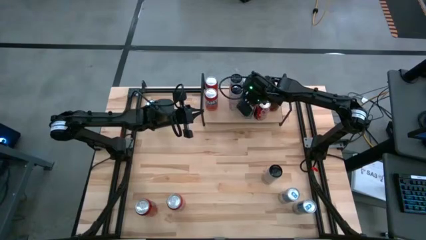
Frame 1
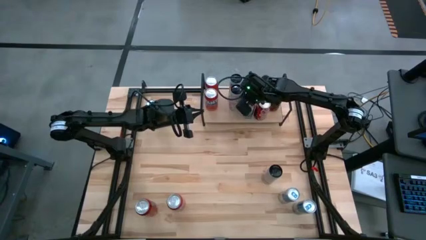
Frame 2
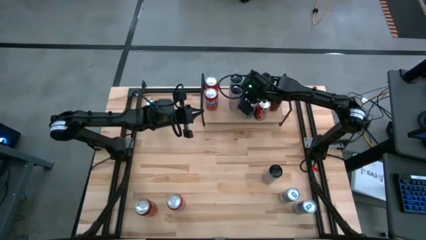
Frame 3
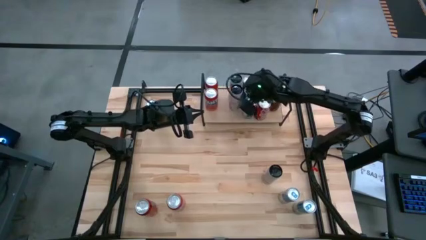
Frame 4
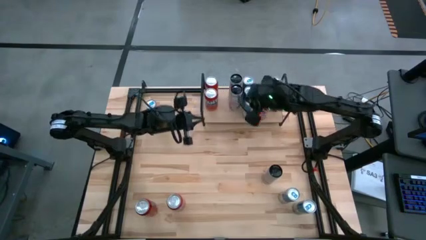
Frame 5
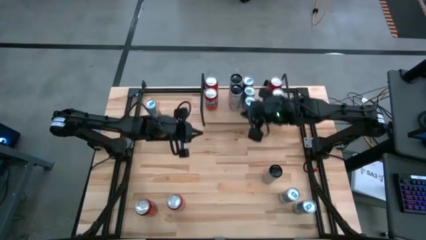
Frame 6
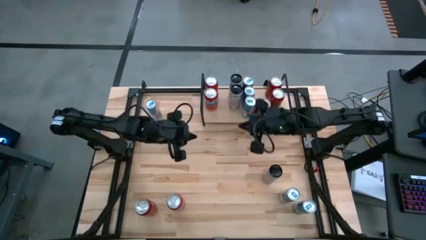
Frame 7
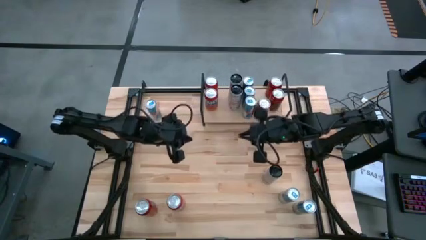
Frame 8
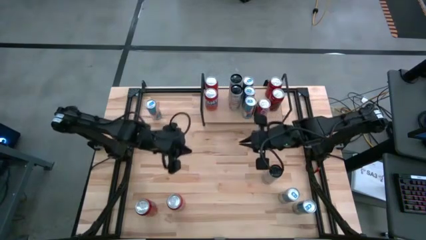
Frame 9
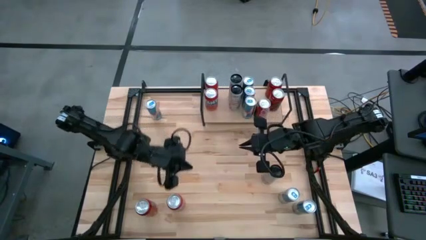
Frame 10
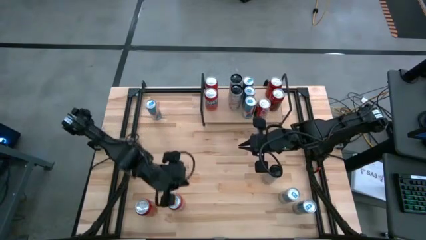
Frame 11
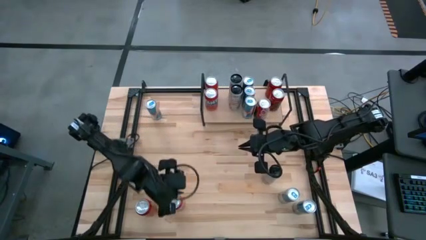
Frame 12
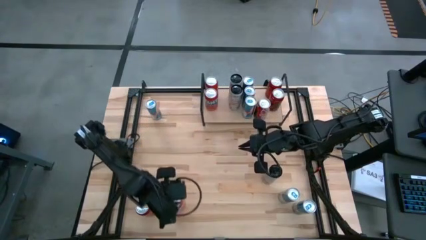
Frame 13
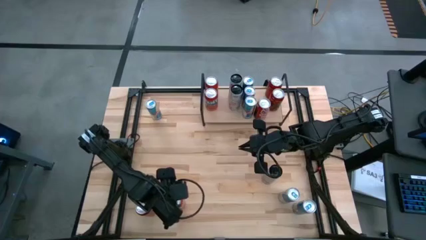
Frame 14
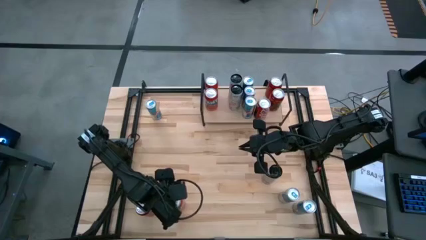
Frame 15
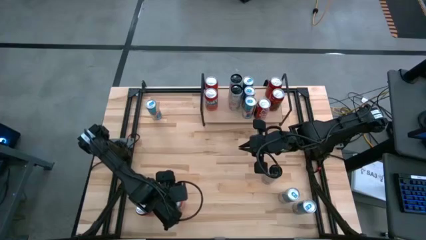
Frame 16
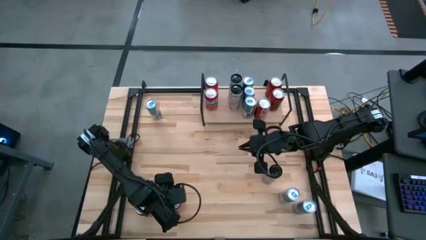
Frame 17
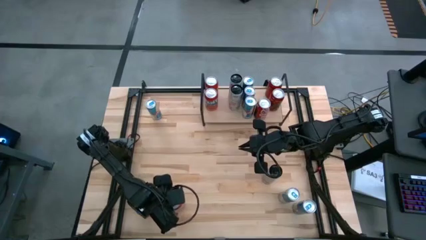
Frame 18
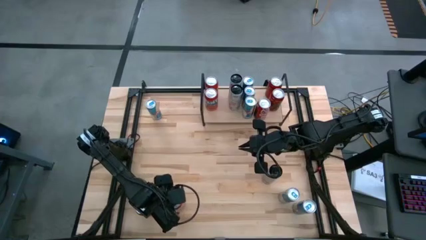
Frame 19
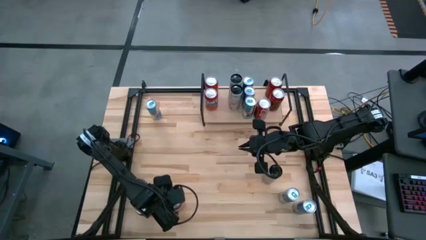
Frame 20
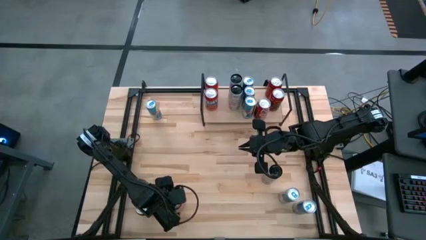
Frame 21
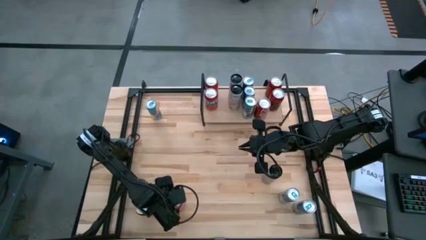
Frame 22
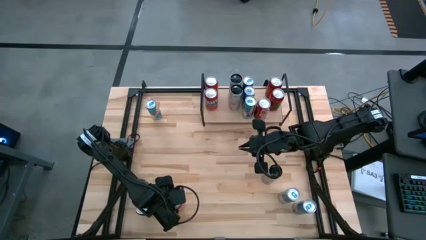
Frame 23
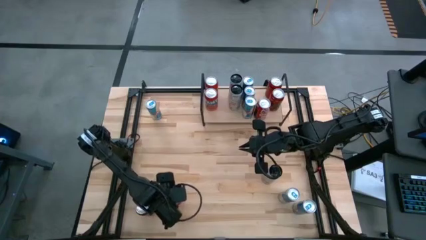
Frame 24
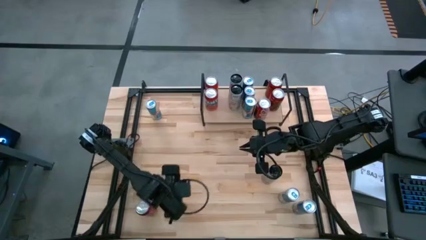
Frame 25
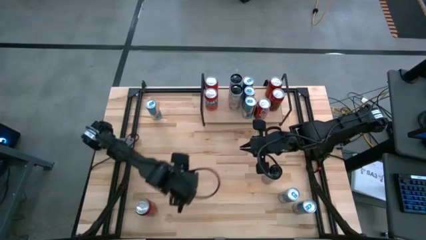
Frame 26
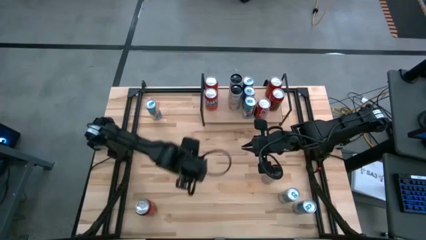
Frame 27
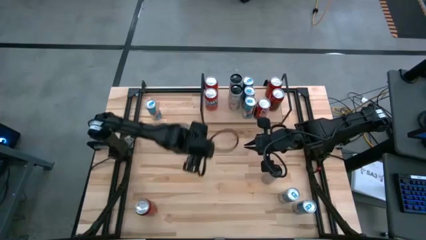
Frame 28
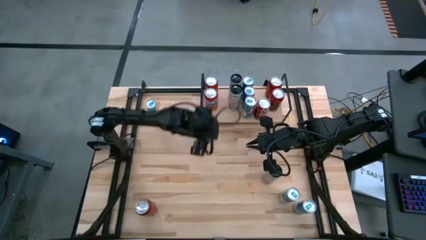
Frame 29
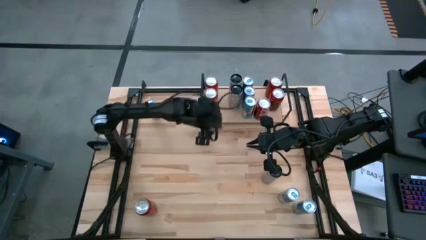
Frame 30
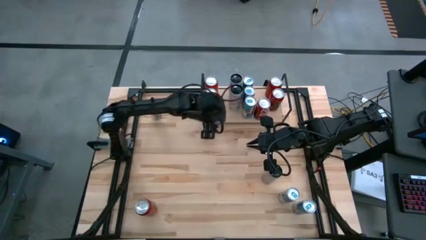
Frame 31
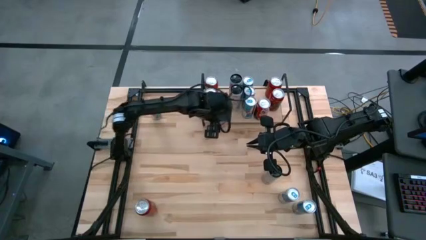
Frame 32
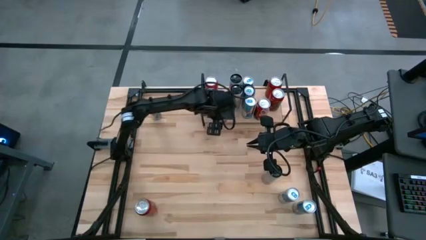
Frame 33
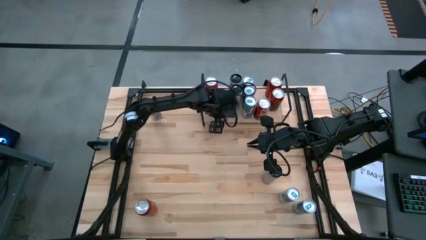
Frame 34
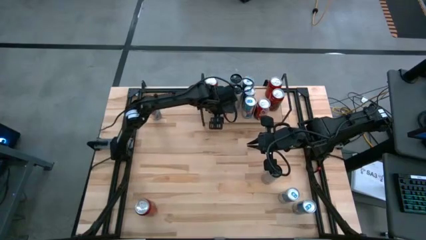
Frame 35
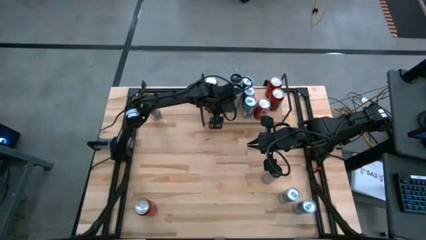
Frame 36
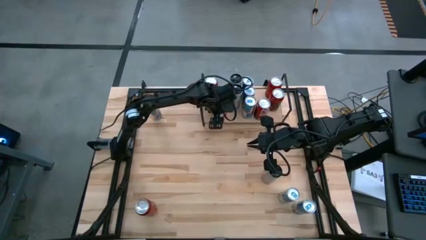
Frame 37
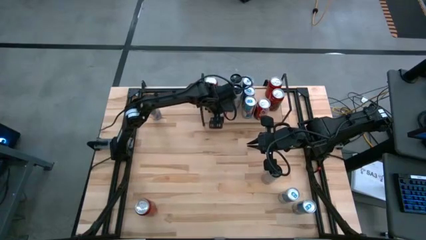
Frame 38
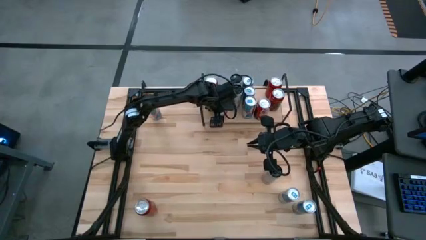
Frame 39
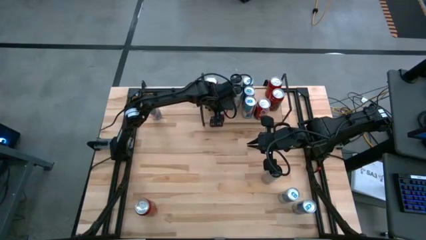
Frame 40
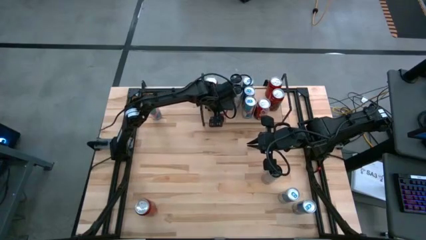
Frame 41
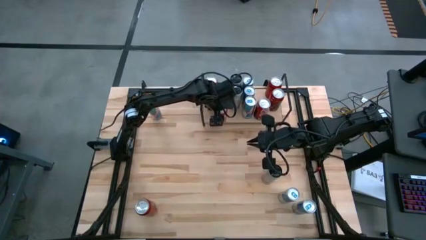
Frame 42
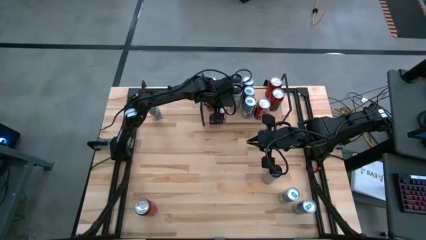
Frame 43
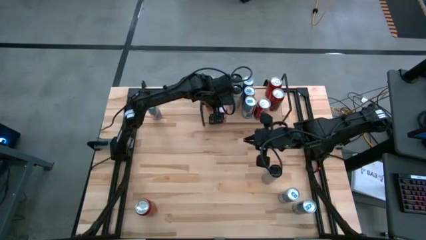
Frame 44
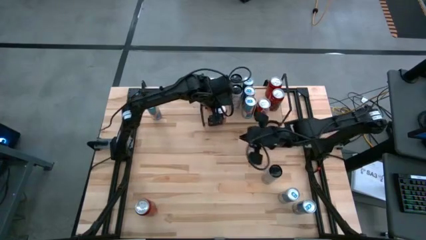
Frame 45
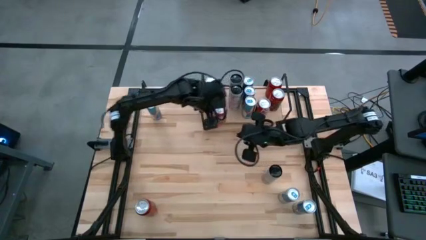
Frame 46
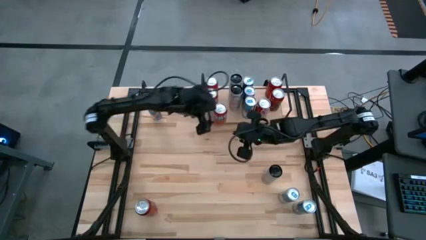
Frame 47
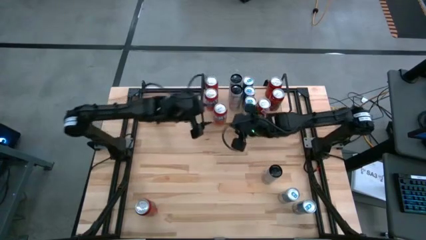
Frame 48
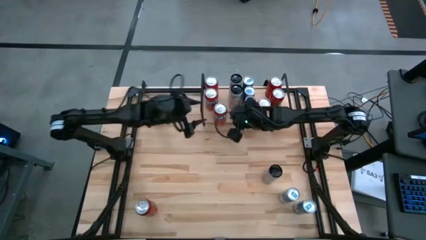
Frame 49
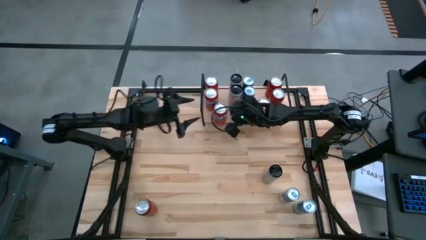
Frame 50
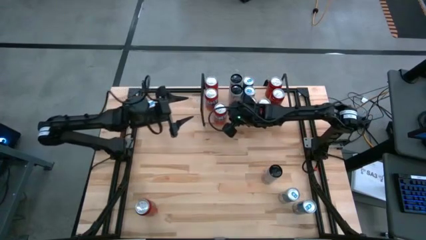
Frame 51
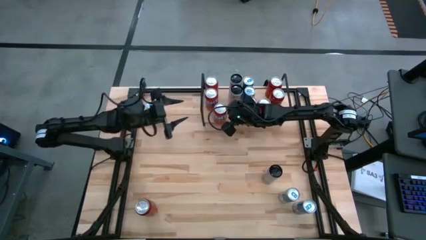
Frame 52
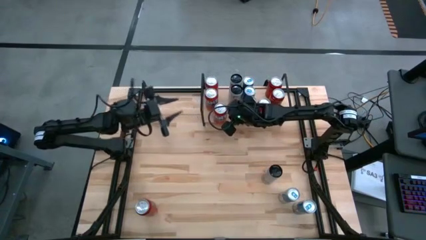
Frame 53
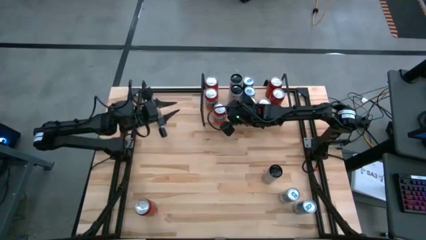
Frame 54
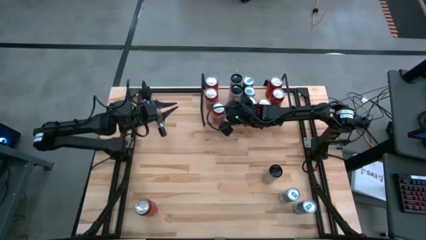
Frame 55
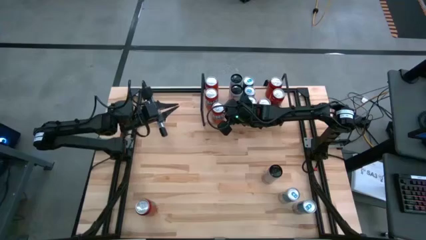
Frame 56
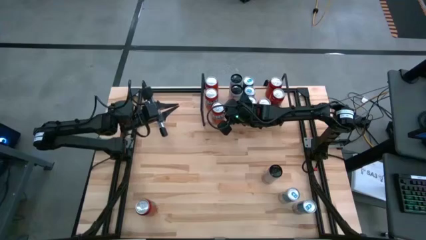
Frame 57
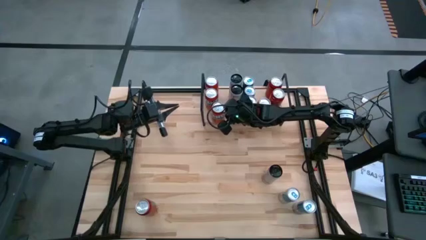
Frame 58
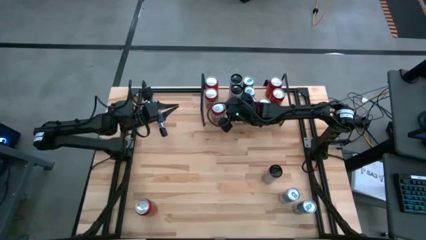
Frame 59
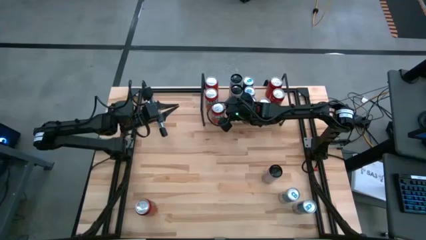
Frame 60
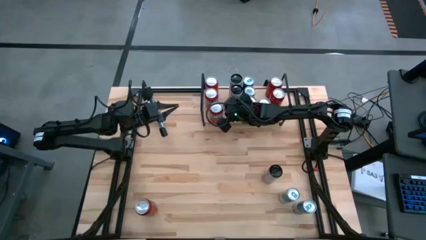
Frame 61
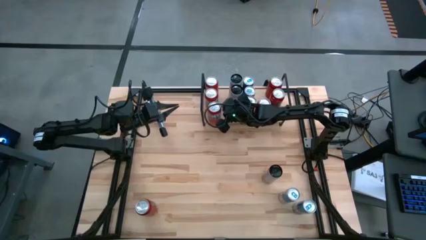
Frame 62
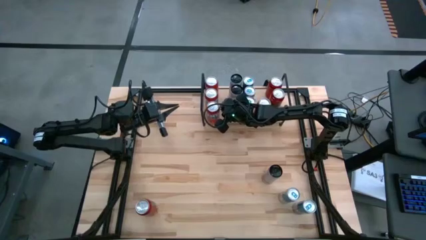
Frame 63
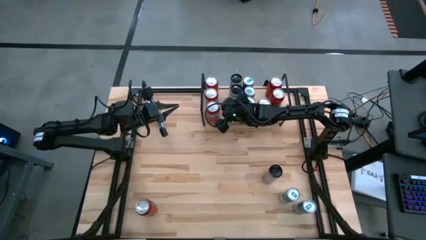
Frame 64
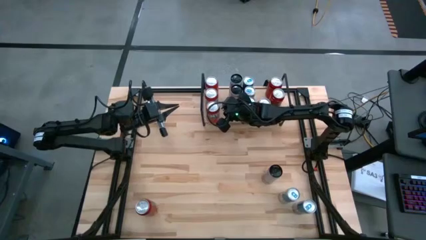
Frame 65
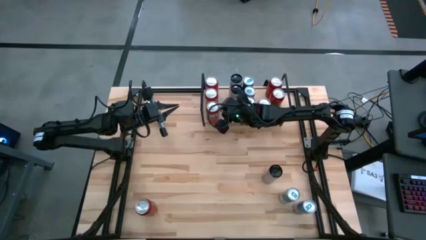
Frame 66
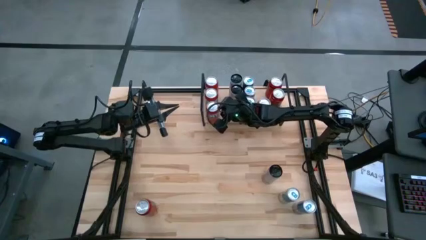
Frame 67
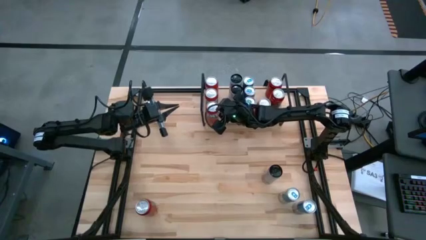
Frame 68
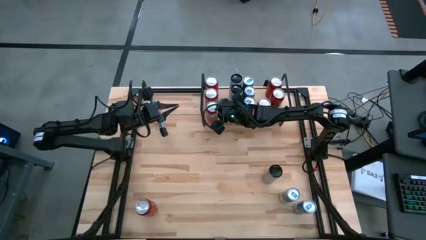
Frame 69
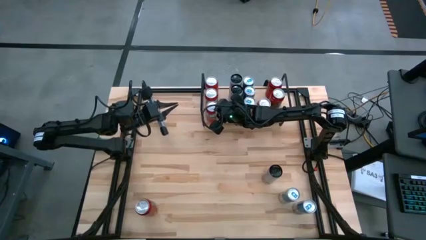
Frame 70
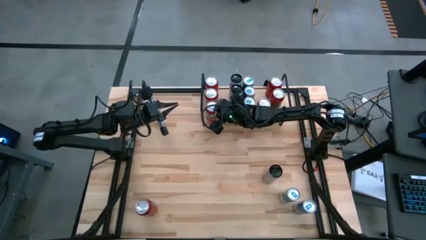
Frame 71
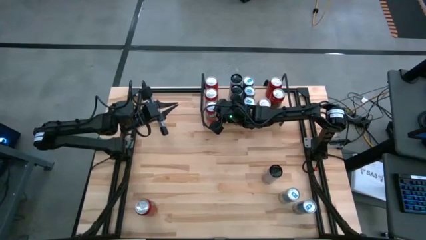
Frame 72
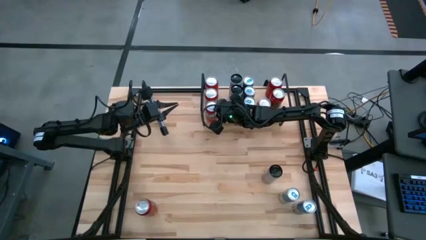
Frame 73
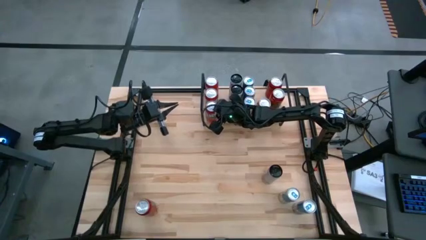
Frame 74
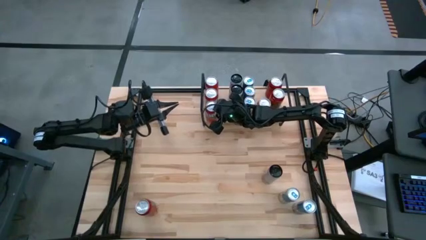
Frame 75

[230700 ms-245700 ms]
Task: Place canned beverage on shelf
Put the orange soda can on the shelf

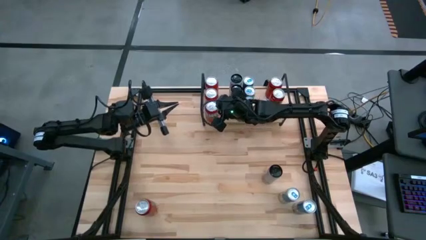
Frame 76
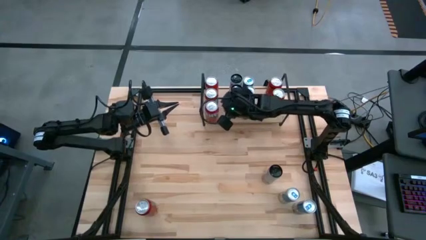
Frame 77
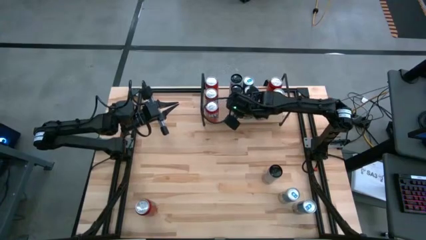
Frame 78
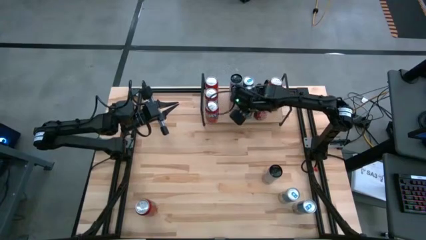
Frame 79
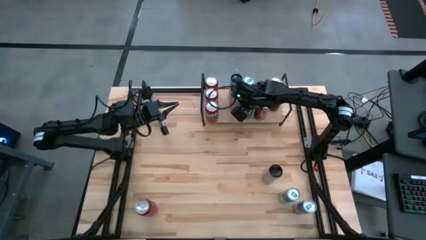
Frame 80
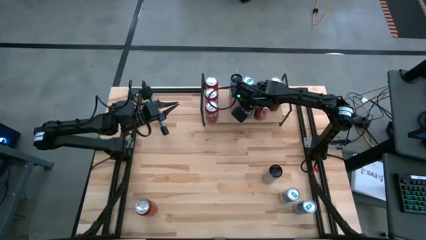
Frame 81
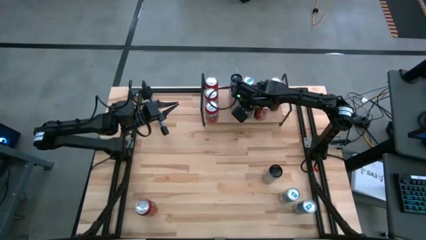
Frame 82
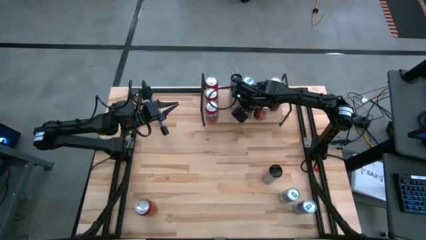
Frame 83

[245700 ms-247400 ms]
Adjust the blue soda can on the shelf
